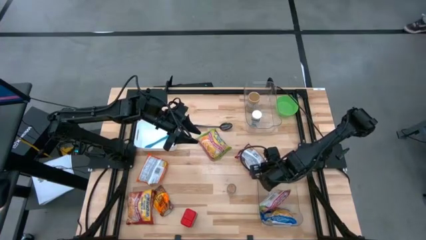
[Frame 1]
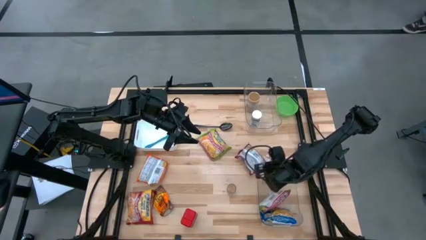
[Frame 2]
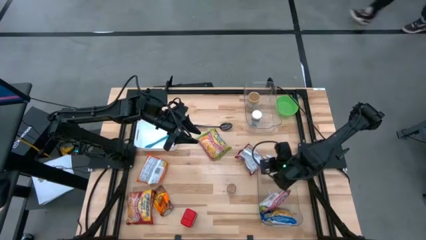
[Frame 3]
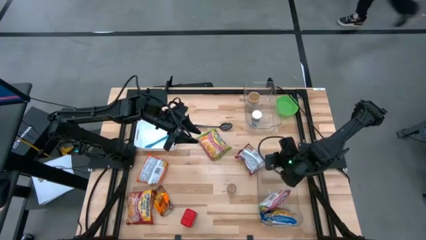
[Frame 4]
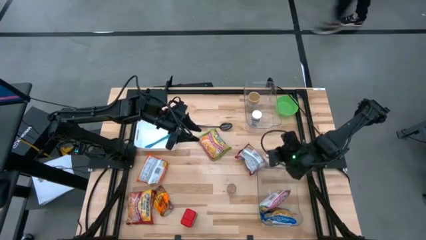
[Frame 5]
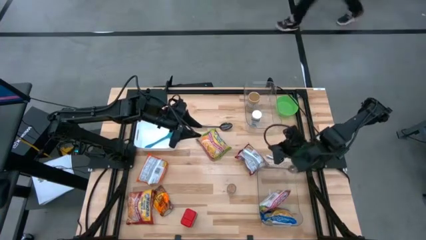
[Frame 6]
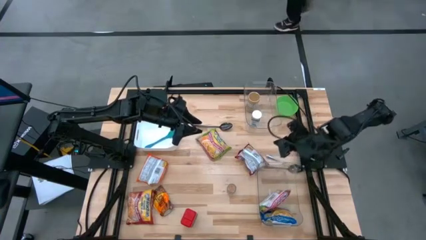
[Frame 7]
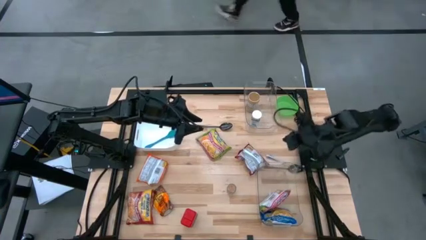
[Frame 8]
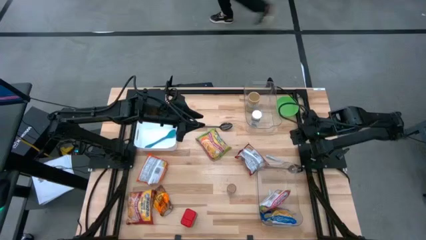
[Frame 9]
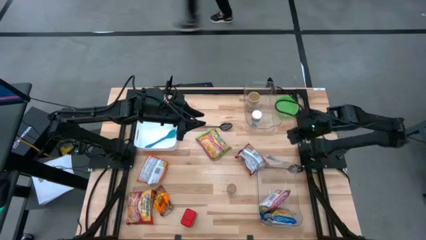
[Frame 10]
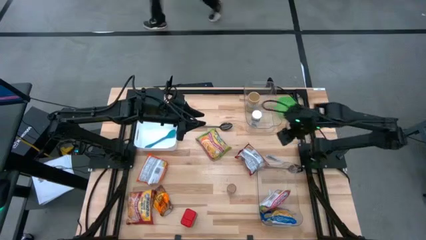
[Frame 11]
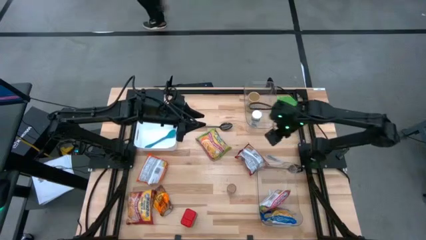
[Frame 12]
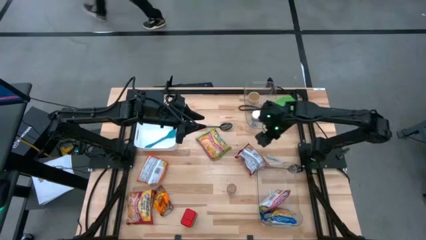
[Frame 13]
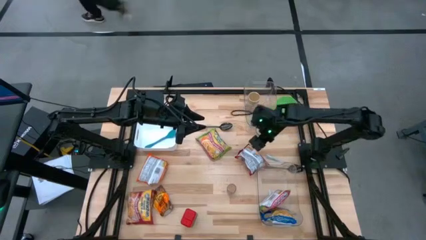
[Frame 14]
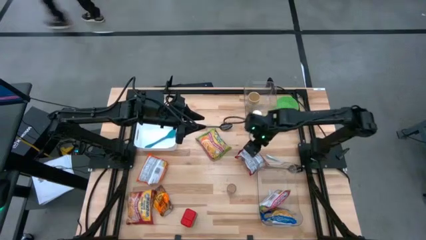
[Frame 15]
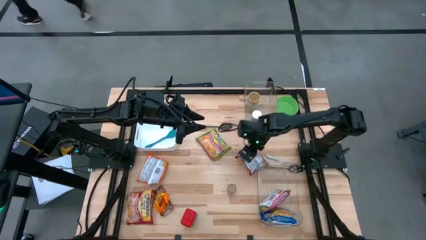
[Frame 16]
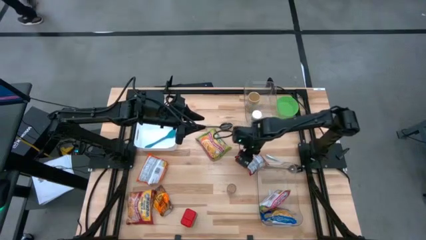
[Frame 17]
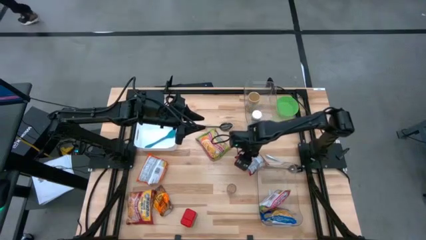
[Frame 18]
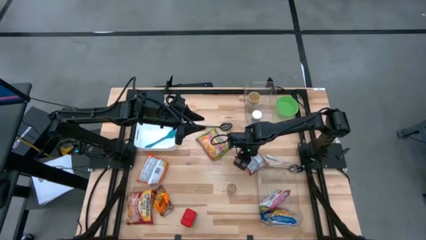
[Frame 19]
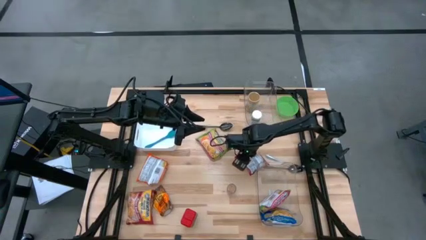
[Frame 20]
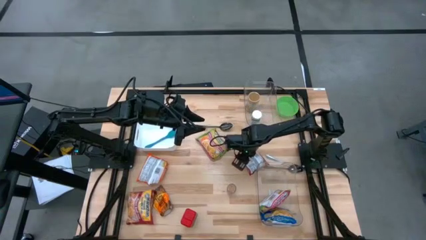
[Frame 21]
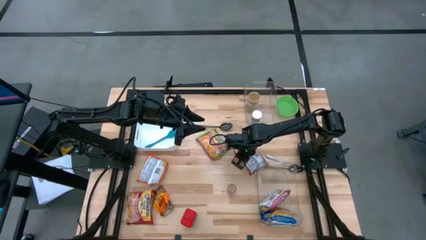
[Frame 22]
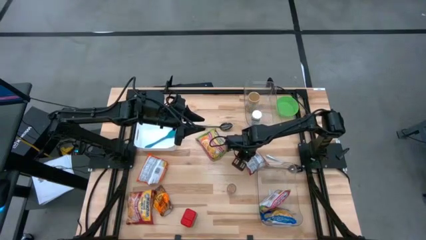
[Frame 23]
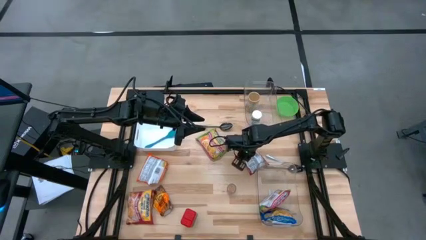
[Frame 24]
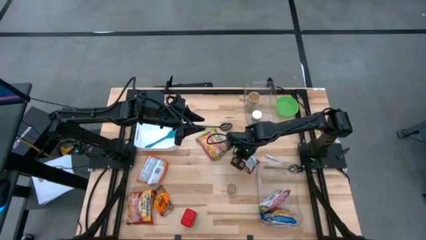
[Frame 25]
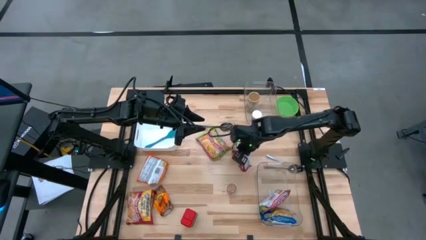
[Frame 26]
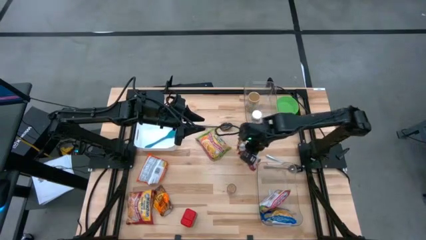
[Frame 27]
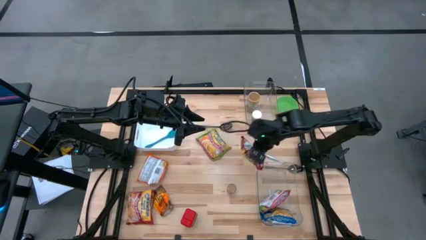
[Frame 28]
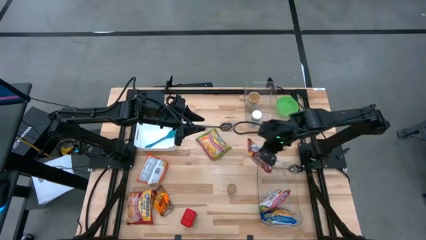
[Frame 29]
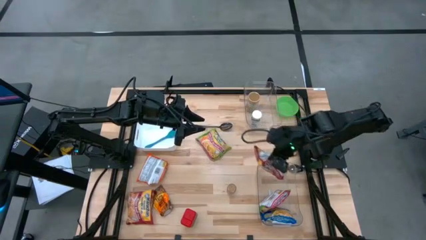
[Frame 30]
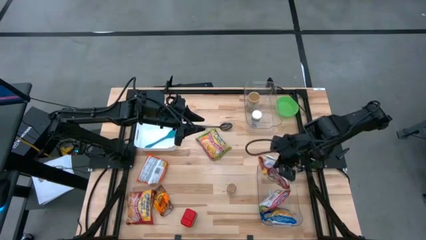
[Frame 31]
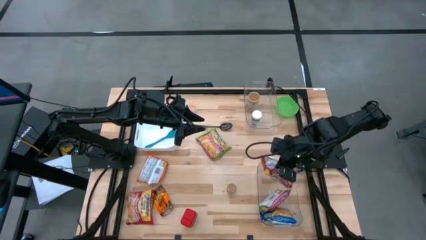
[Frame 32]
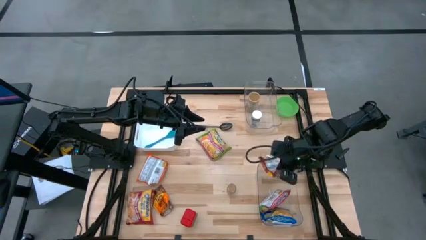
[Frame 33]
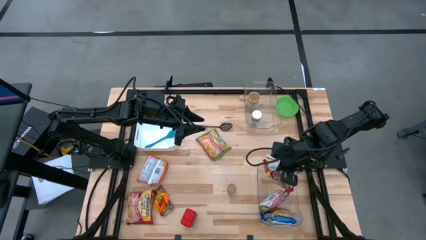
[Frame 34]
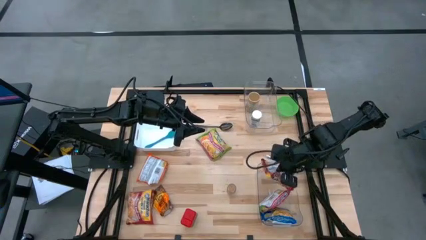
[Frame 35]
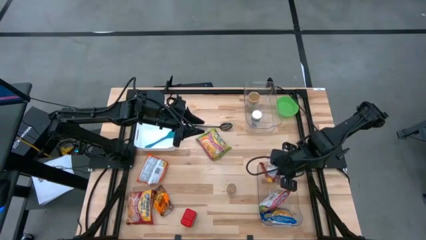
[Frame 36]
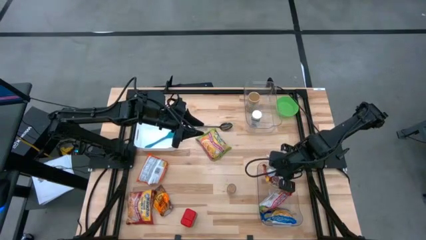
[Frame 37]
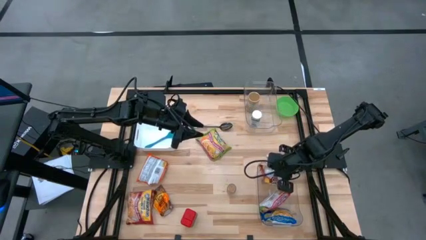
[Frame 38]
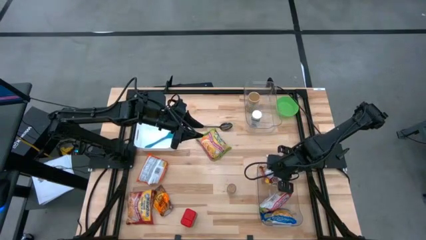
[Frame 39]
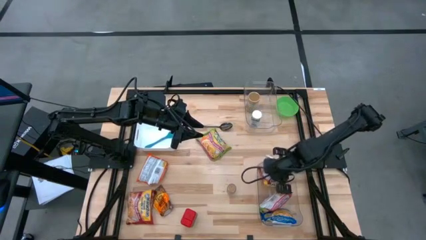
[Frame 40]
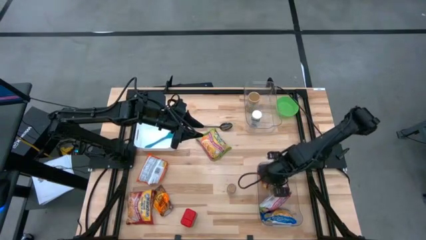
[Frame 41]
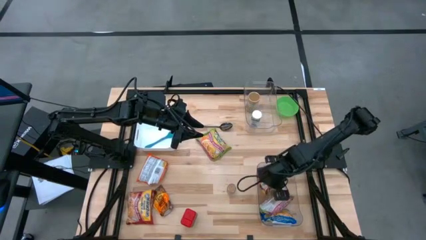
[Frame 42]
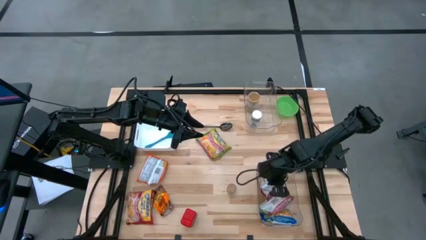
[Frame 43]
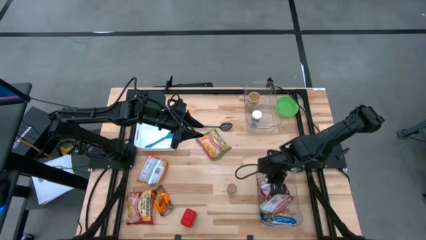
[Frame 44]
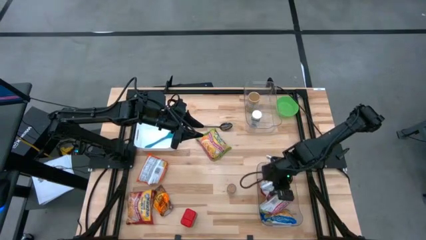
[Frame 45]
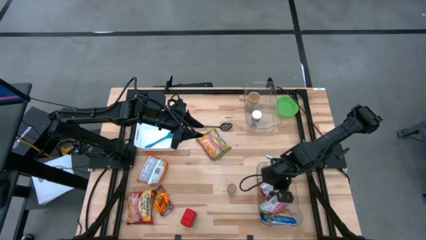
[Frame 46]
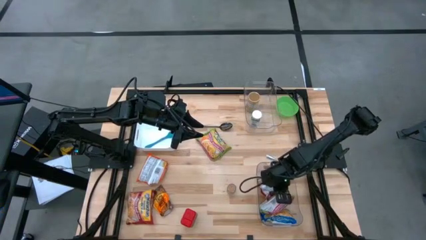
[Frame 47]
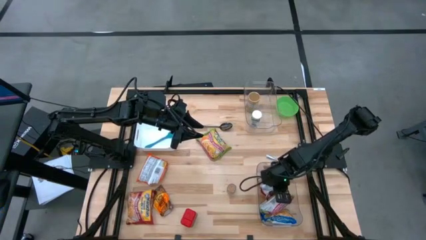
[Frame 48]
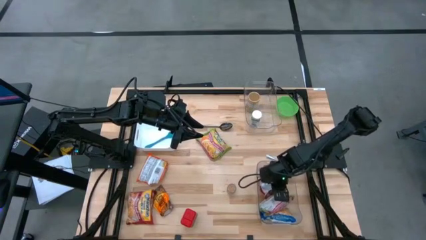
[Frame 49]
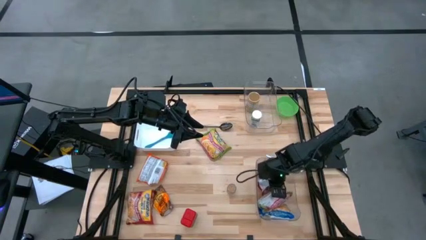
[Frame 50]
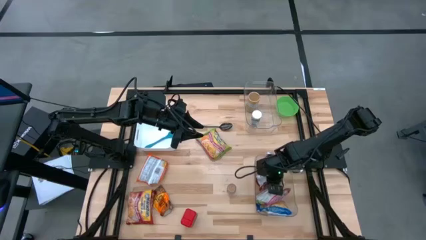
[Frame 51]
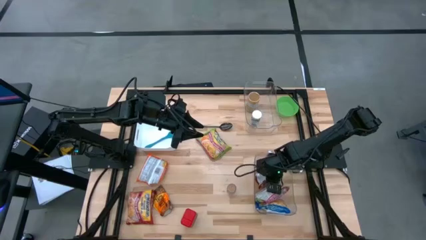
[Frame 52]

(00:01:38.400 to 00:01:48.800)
Task: Pick & Place Food Item
Put the red noodle pack into the bottom transparent bin

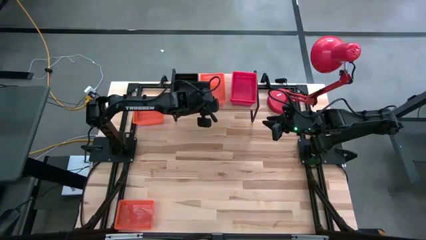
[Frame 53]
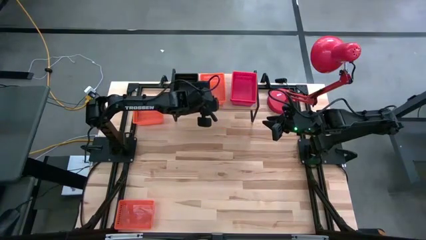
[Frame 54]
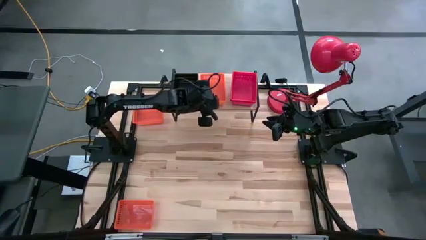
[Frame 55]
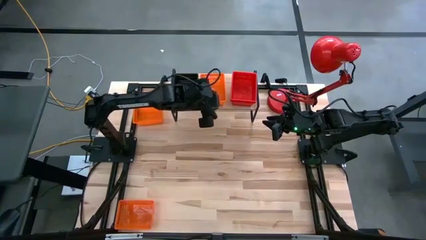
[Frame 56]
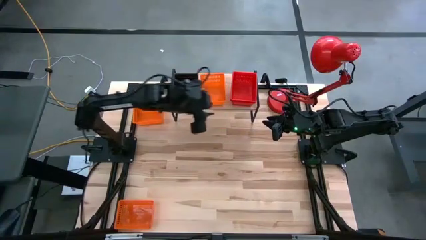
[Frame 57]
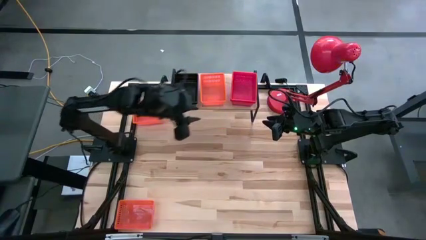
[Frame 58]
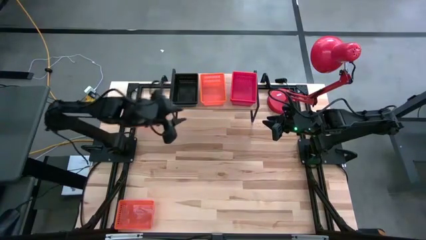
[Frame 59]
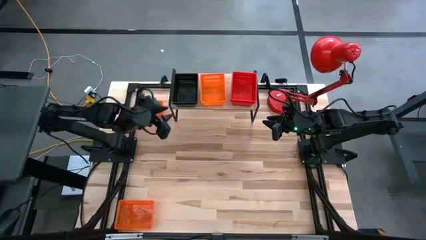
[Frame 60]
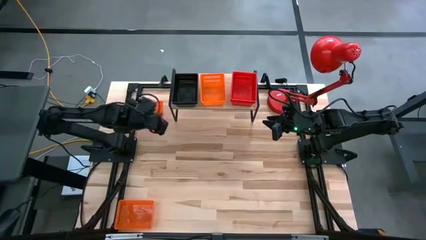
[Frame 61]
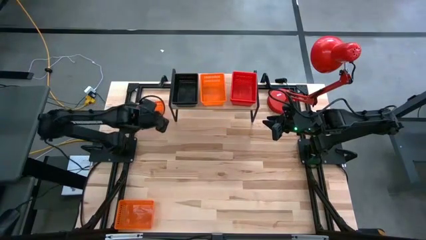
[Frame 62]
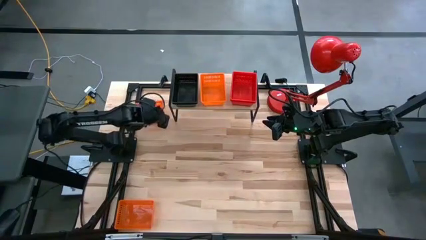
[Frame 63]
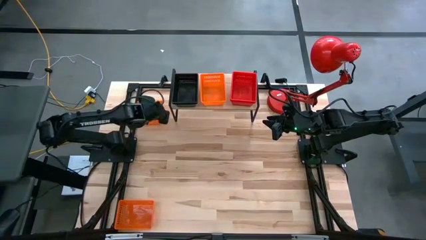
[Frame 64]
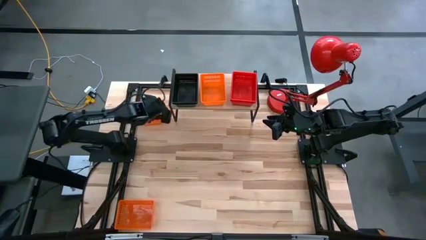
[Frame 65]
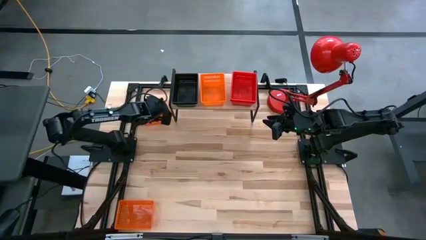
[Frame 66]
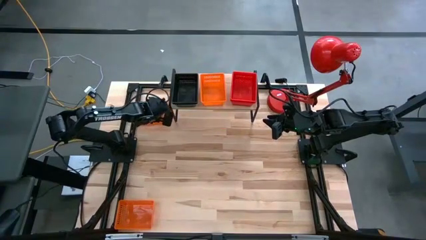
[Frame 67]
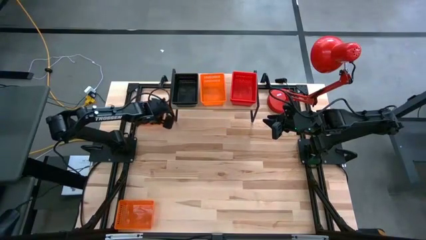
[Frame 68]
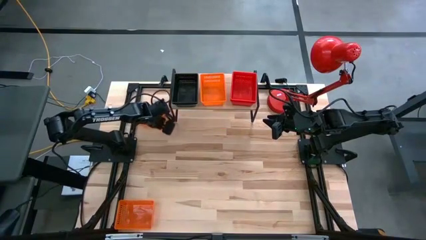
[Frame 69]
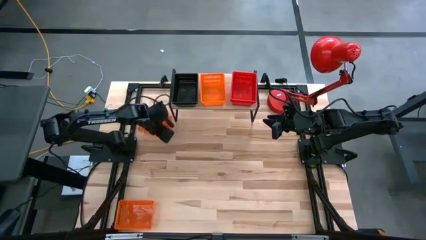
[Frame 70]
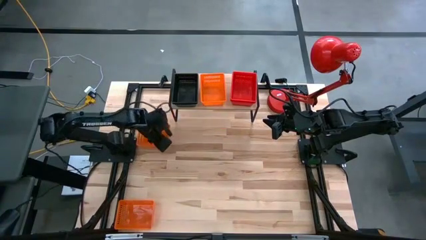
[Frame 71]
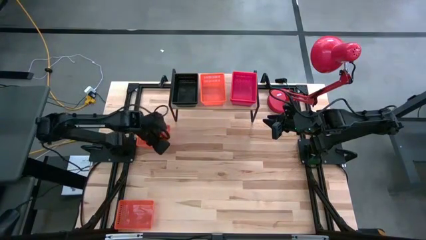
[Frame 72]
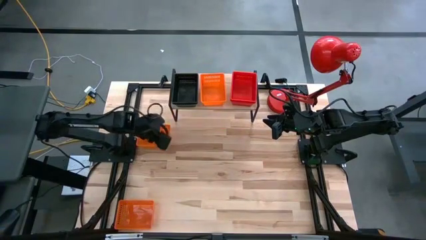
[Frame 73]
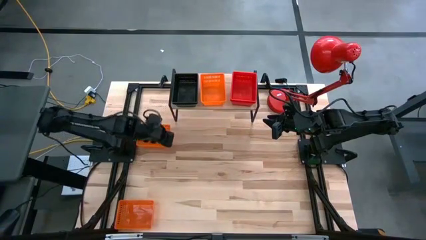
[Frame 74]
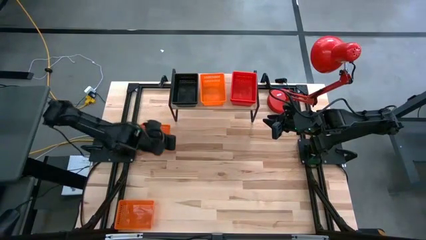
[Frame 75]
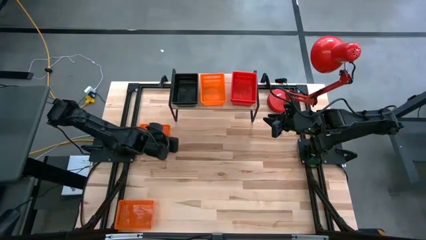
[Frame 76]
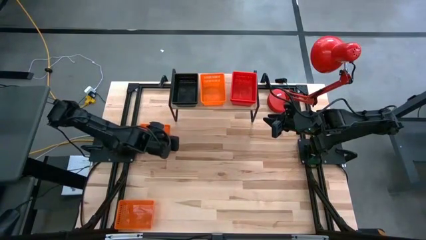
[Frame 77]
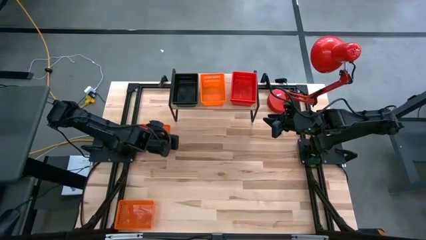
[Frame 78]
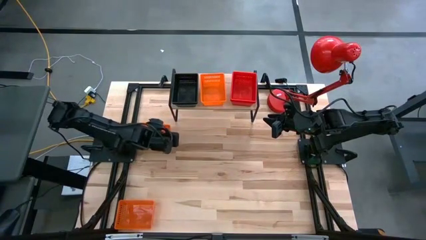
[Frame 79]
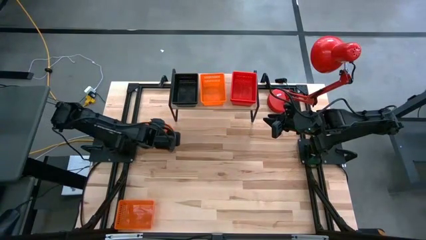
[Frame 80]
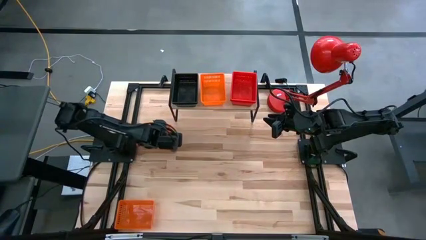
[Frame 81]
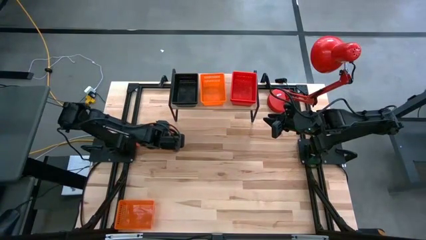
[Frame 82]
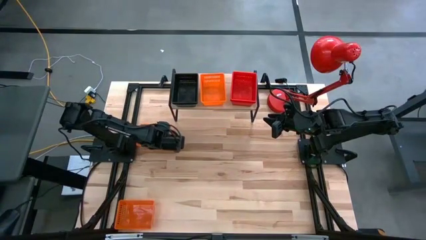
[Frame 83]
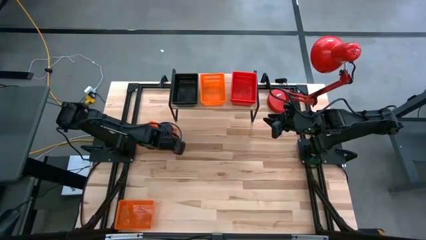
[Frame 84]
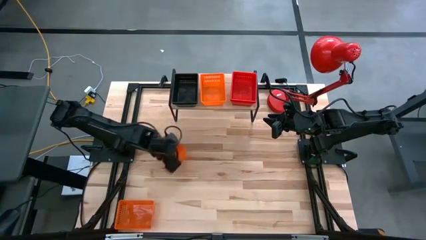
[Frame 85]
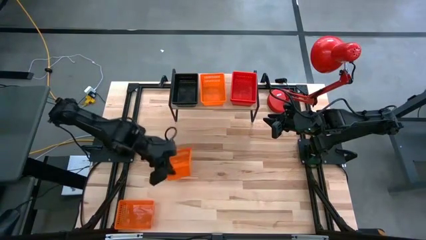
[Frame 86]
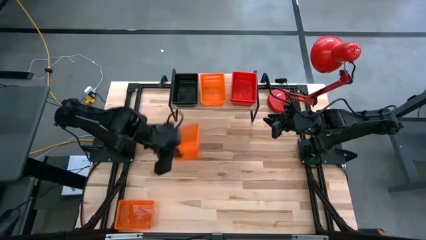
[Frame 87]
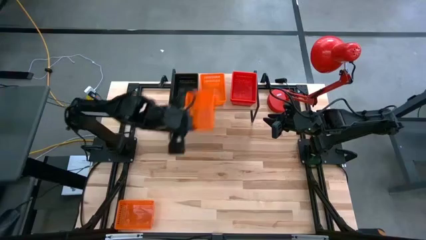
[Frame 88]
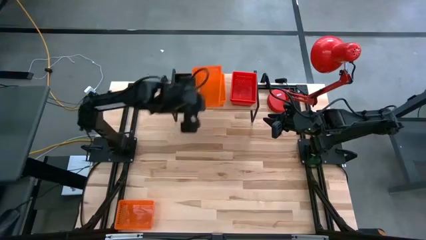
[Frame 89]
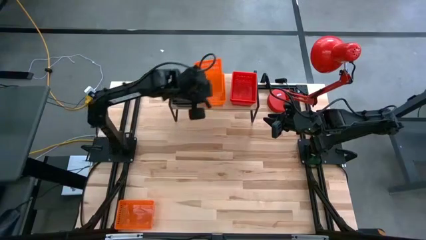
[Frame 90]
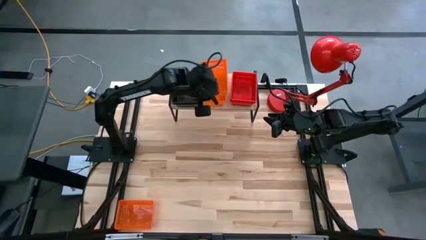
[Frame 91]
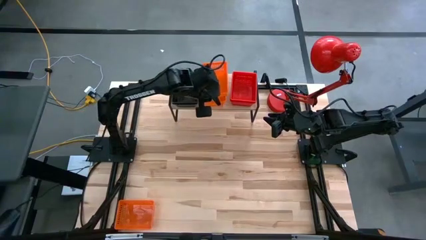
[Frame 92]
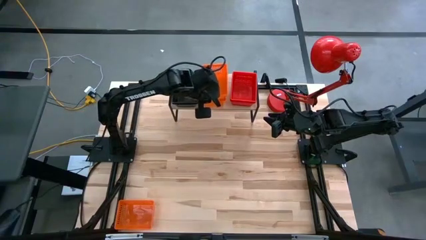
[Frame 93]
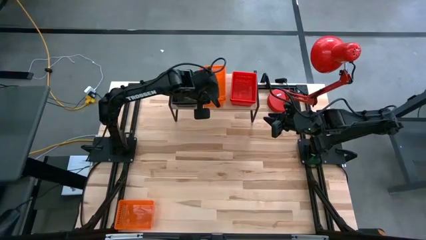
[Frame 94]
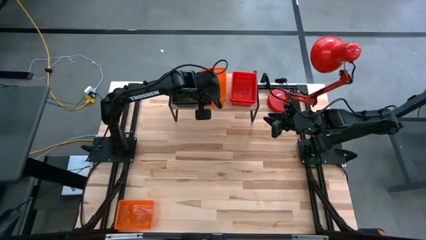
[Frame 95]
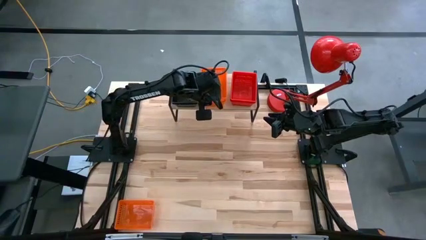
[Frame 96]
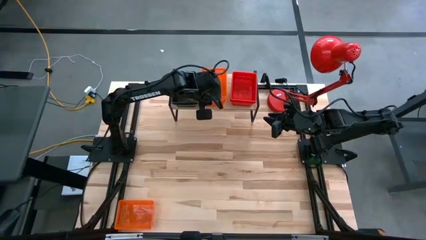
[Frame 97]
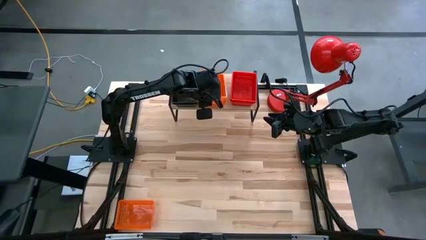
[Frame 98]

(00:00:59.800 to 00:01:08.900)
Task: Stack baskets on shelf by color
Stack the top orange basket on top of the orange basket on the shelf
